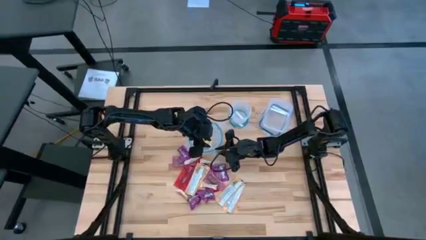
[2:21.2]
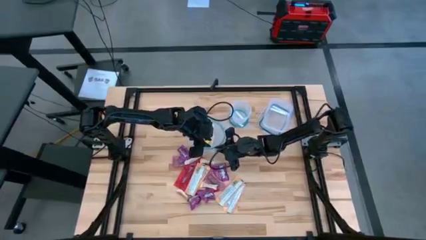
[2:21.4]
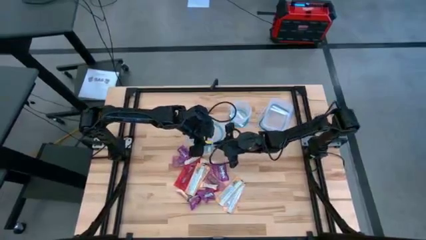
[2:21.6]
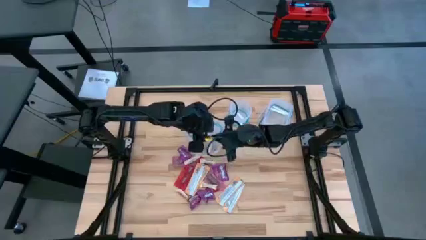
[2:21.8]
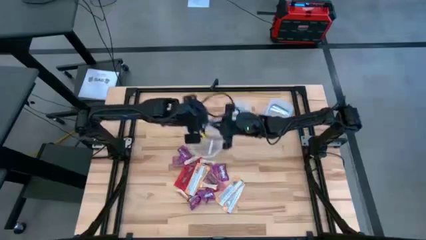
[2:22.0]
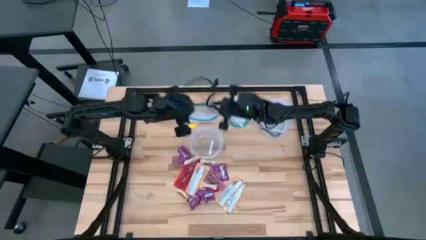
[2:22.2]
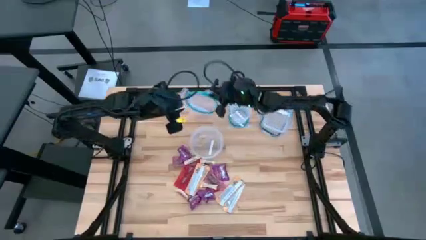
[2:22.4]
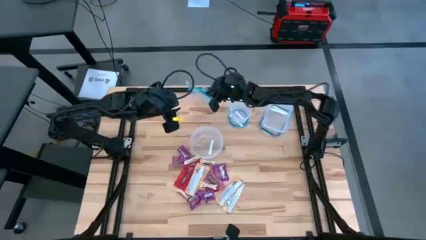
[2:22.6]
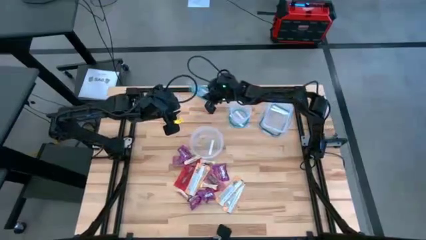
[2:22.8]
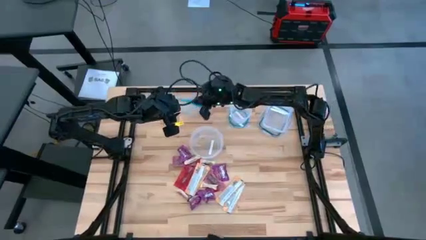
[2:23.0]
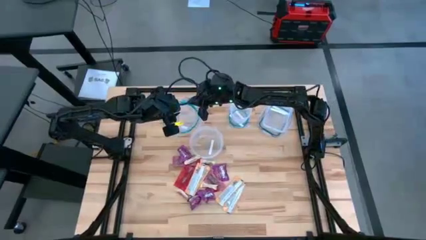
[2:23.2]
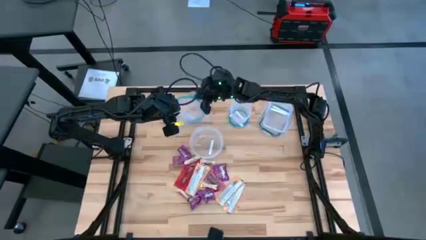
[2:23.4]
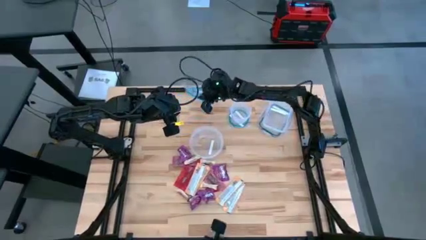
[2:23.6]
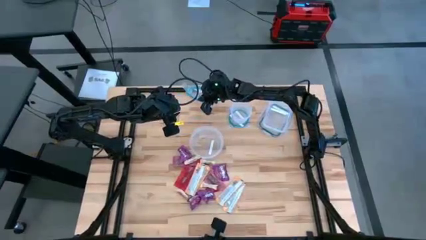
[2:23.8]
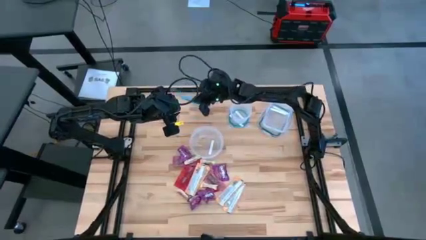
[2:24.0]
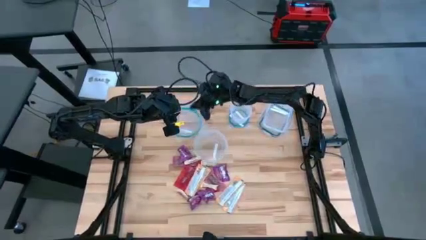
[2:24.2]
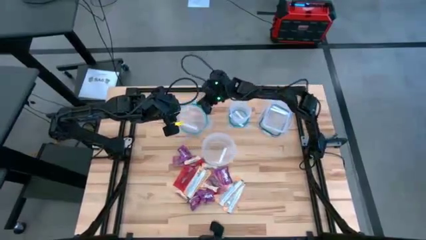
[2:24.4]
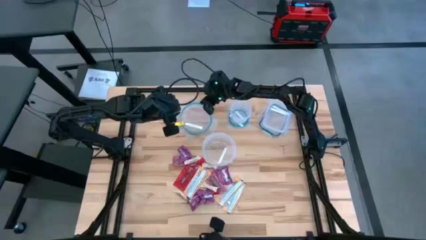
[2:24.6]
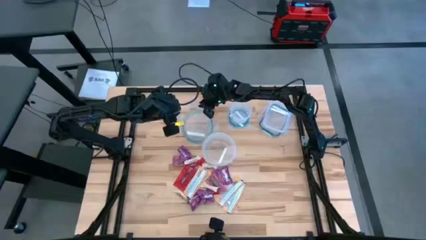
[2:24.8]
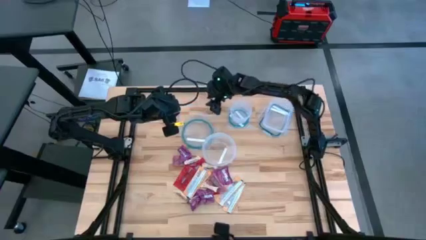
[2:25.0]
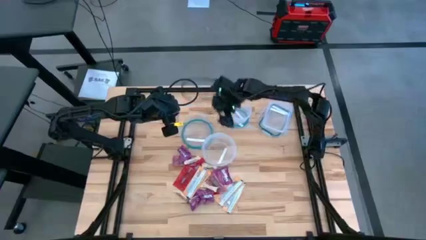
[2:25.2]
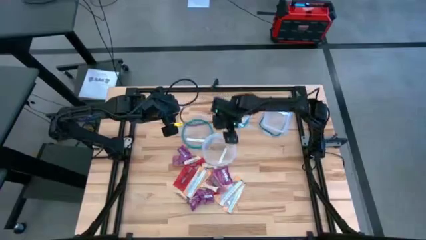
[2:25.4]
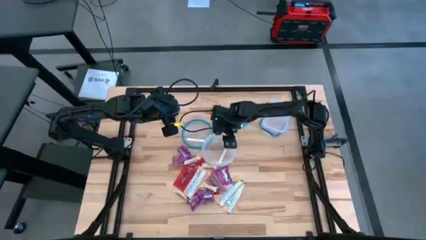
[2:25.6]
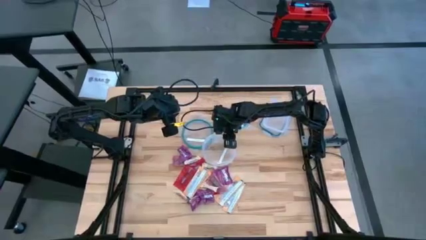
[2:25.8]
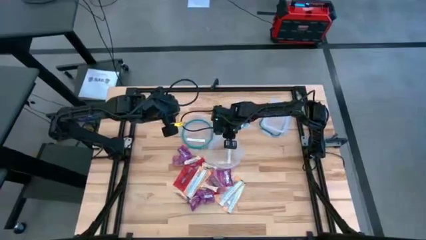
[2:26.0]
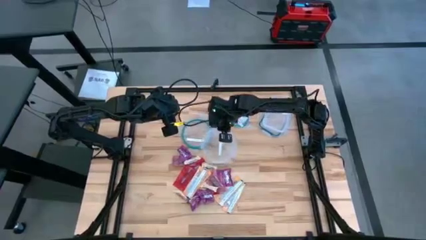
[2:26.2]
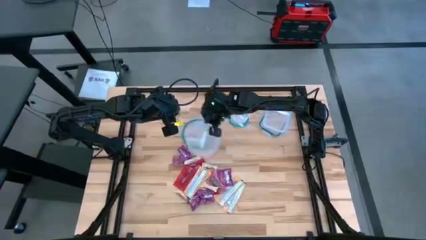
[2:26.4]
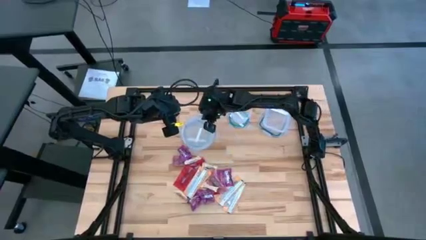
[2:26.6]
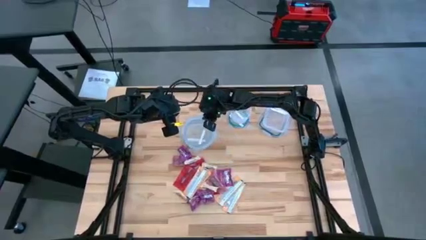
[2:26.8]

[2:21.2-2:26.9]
Task: Sort candy
Remove the big round transparent bin's lid

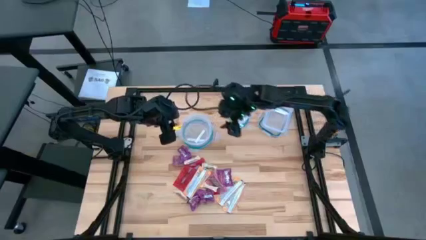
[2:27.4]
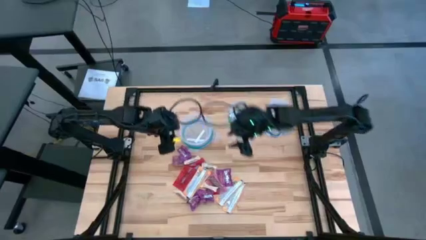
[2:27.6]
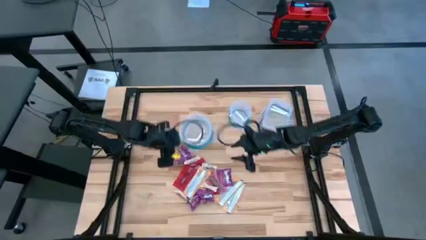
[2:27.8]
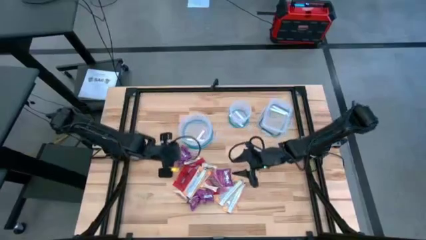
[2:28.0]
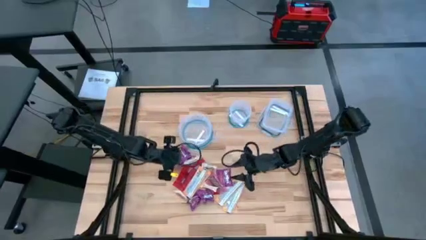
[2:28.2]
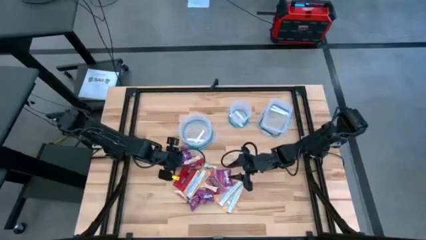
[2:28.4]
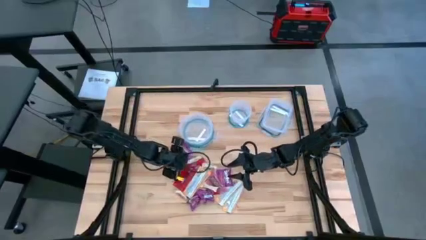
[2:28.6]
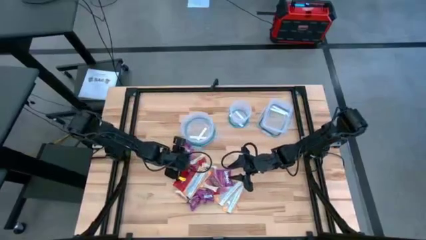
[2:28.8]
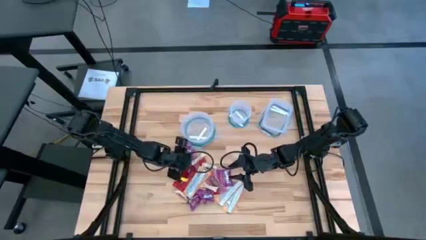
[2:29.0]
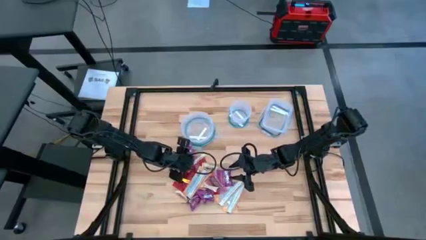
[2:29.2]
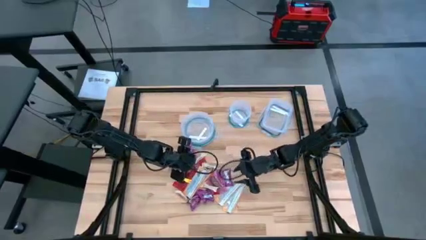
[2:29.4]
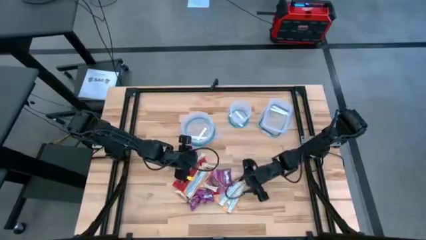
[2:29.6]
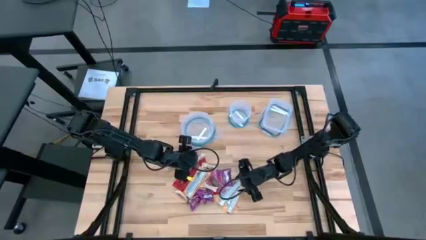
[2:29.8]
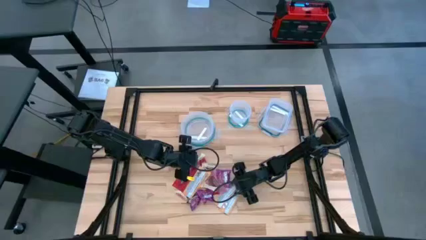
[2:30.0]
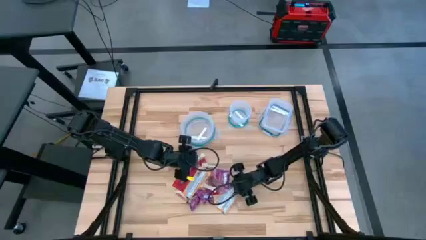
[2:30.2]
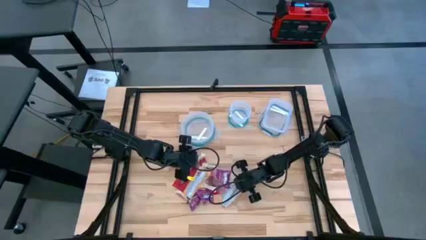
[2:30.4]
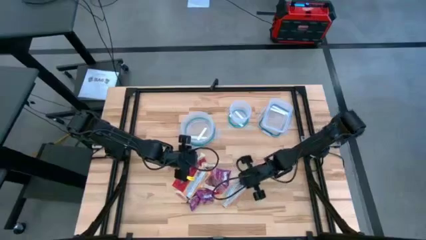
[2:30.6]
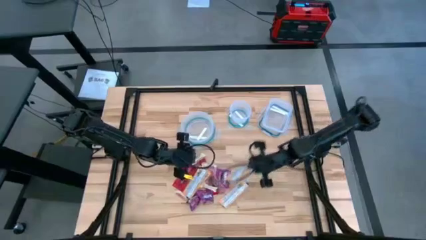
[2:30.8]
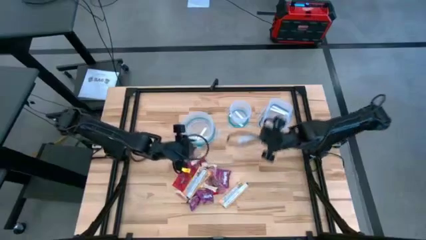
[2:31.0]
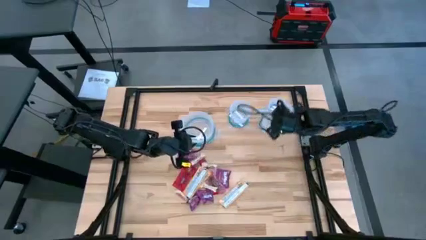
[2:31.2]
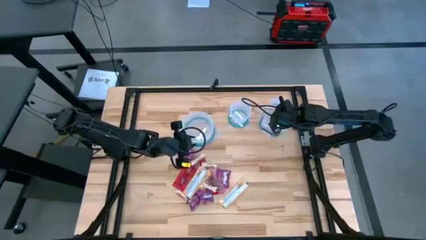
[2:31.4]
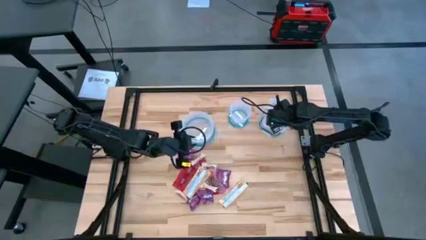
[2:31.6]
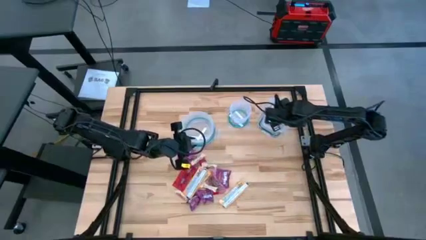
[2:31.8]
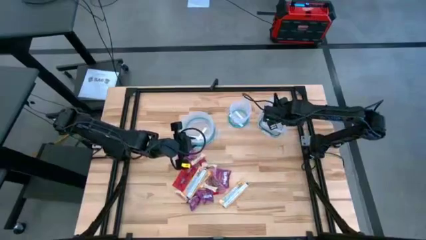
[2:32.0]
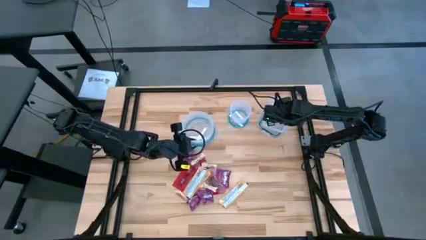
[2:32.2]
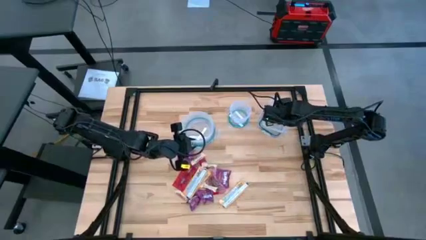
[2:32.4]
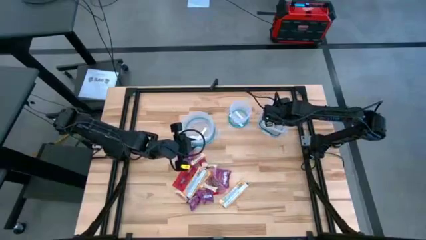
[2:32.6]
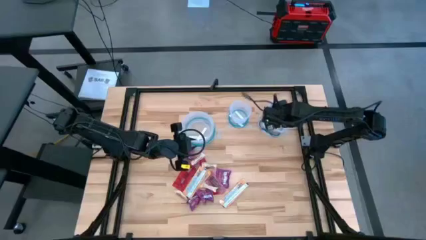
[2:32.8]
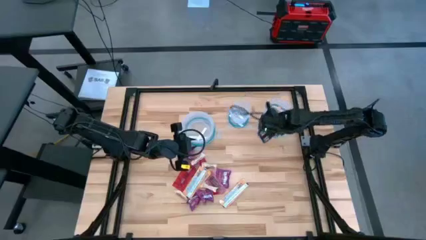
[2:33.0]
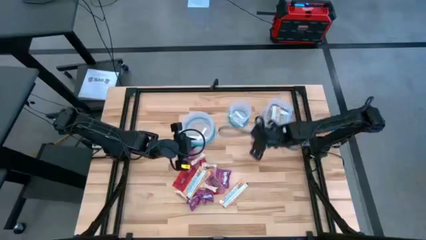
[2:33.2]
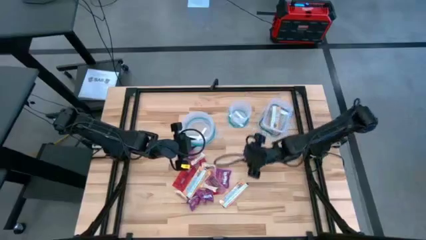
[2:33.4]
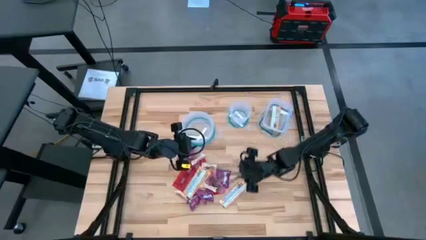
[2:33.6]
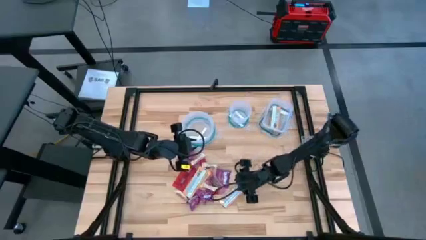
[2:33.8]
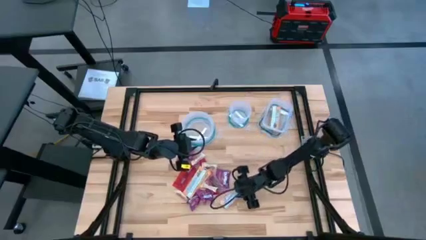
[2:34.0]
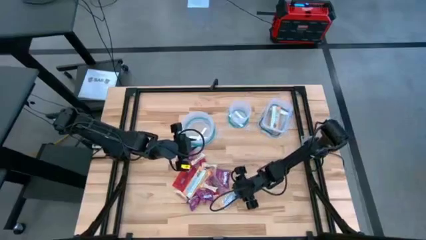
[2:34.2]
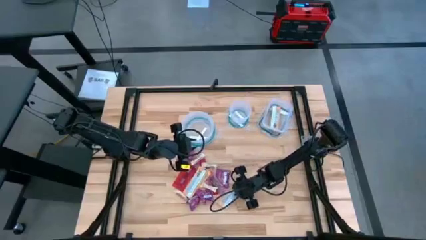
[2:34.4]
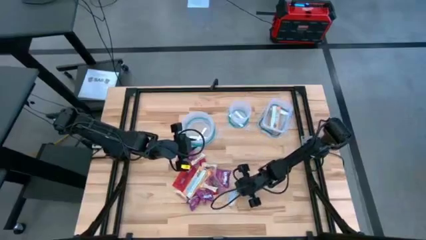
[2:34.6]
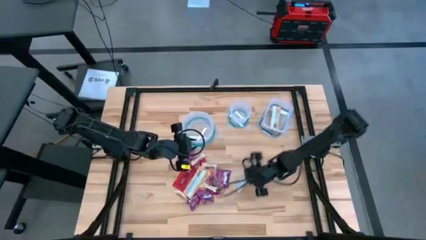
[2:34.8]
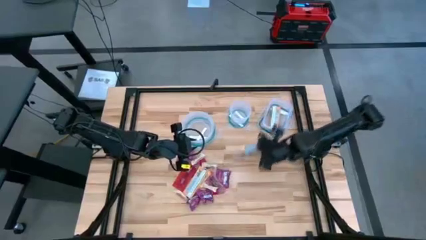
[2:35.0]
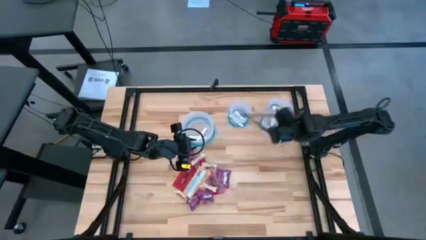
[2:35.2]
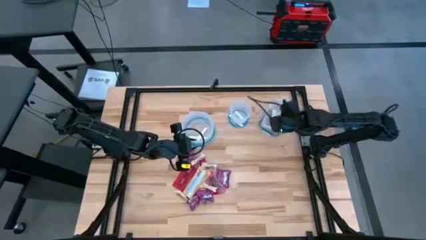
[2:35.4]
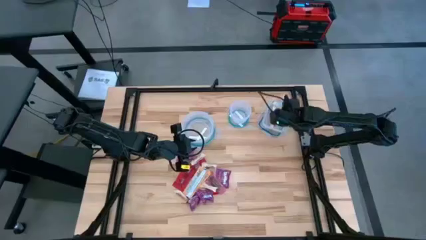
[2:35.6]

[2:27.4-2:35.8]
Put the yellow candy into the rectangular transparent bin

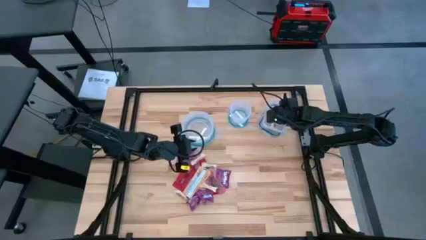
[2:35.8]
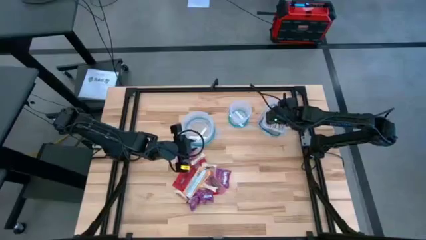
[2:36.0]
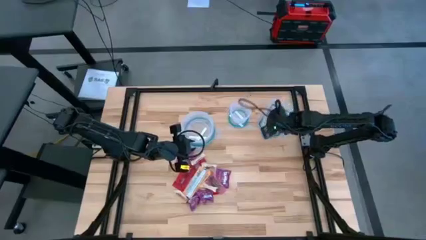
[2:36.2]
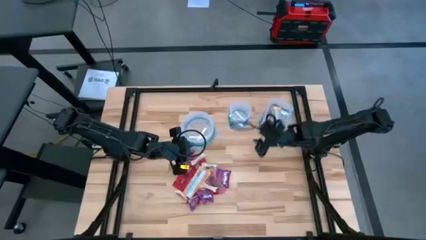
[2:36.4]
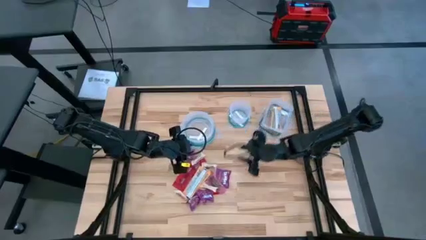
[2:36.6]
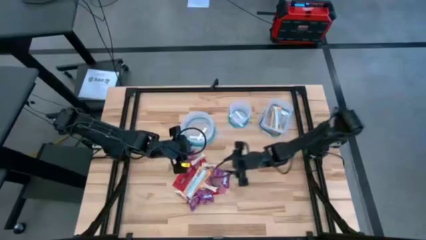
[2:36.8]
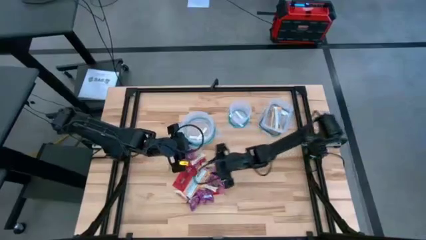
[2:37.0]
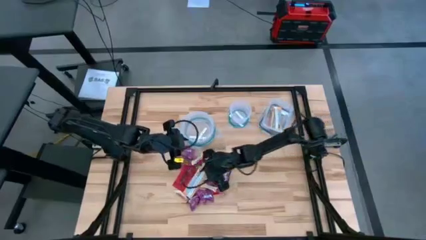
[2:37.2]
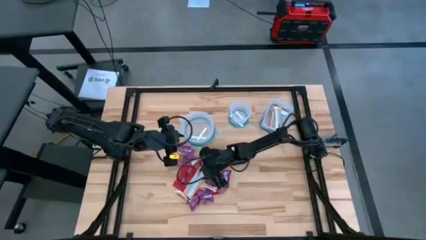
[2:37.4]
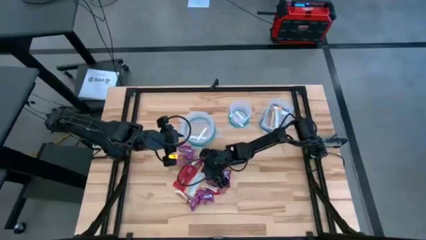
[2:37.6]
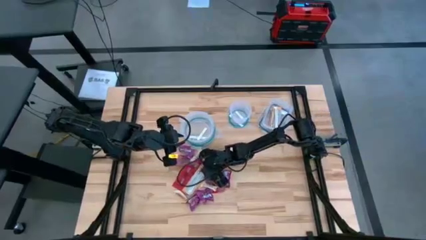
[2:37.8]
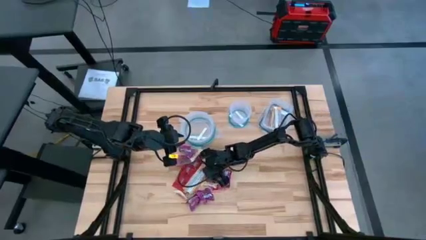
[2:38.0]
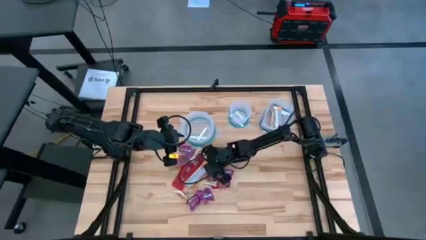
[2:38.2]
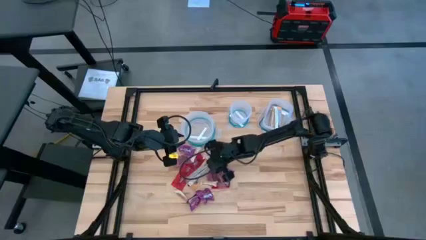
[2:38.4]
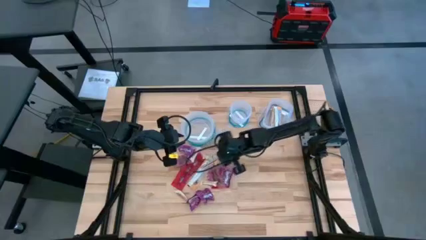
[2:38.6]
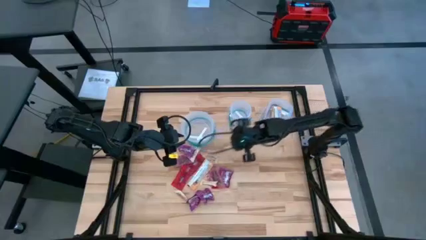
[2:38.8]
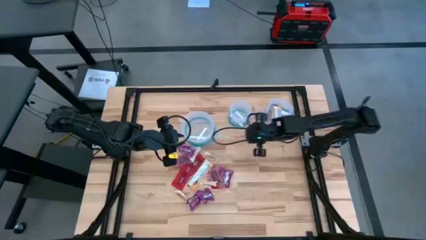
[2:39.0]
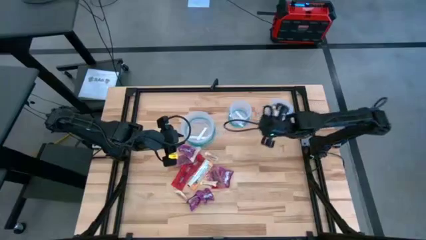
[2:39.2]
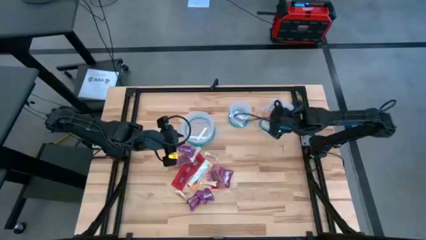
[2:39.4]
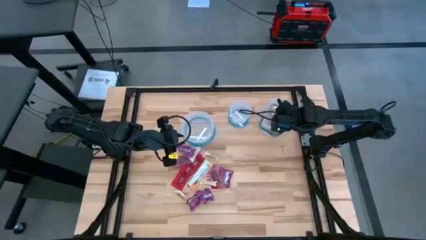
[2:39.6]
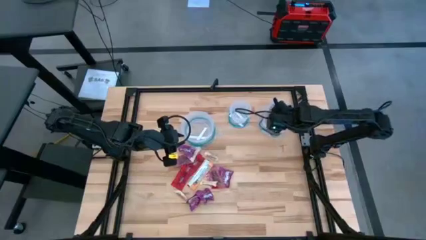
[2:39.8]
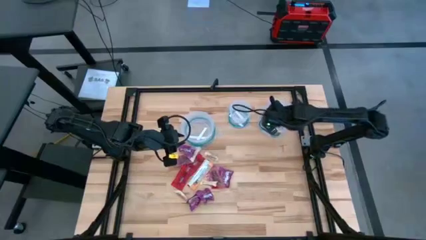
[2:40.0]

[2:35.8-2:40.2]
Put the yellow candy into the rectangular transparent bin
